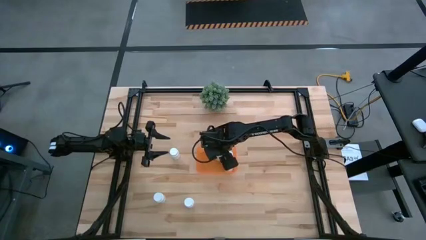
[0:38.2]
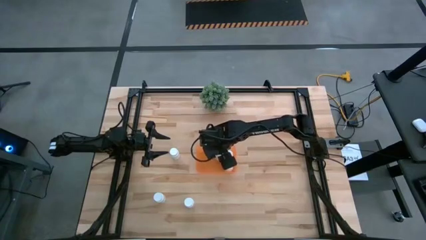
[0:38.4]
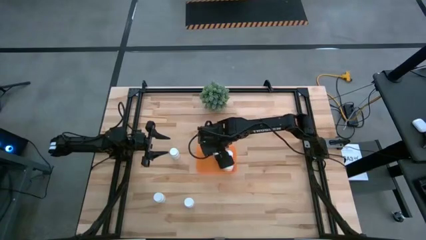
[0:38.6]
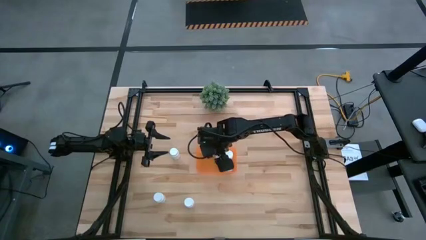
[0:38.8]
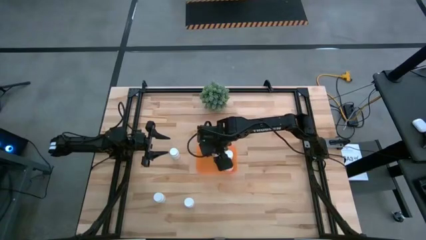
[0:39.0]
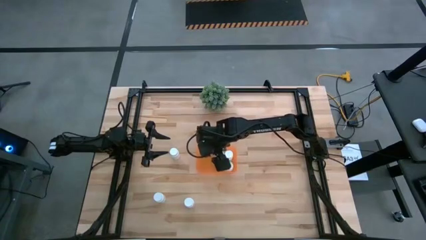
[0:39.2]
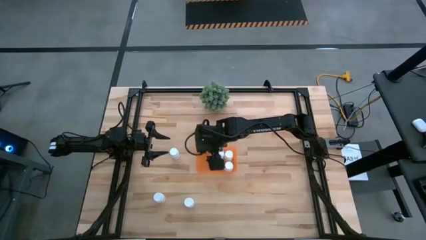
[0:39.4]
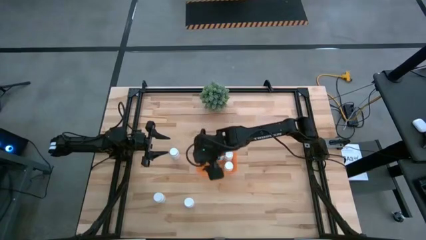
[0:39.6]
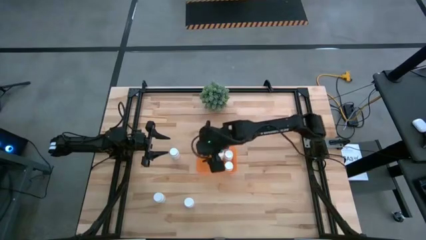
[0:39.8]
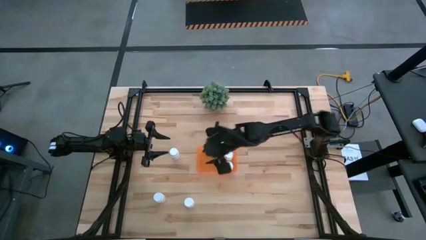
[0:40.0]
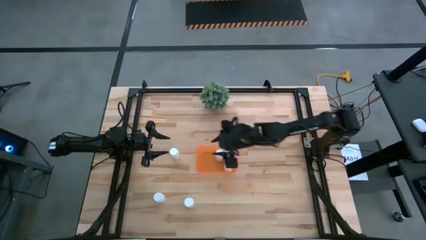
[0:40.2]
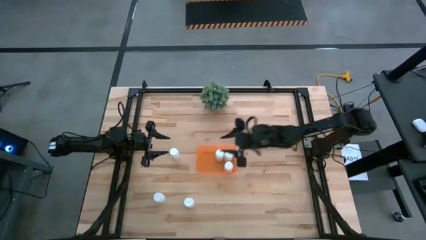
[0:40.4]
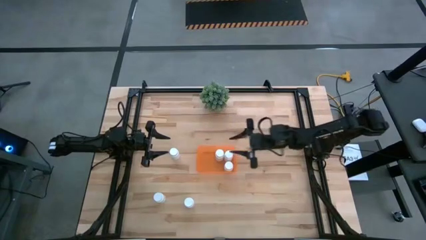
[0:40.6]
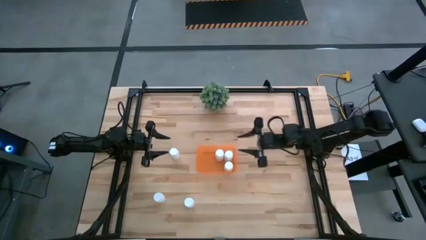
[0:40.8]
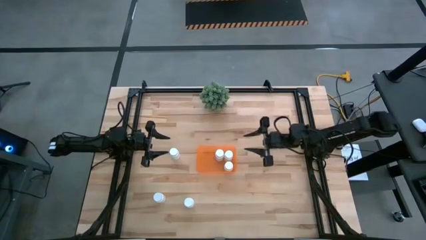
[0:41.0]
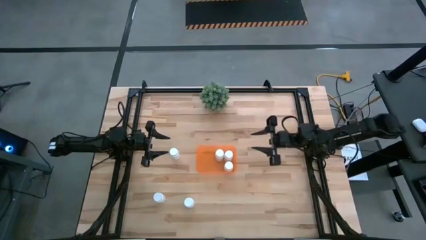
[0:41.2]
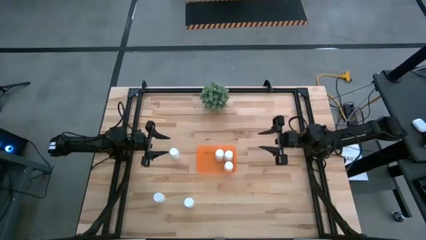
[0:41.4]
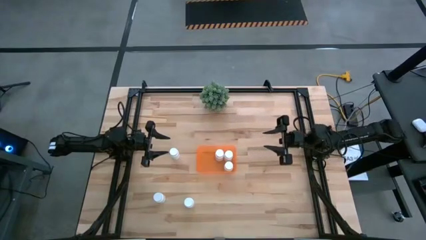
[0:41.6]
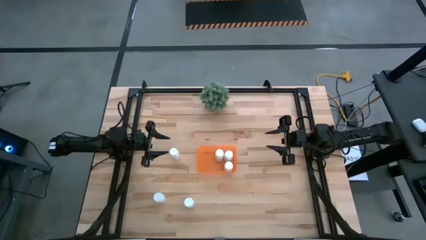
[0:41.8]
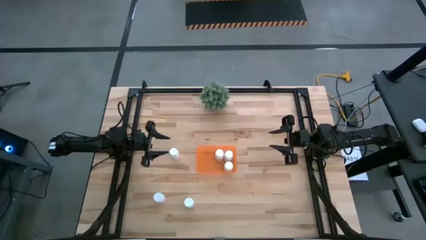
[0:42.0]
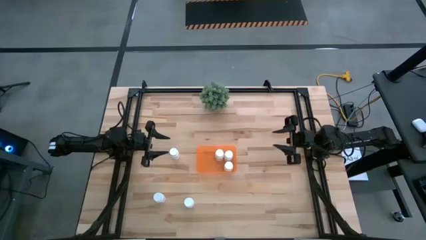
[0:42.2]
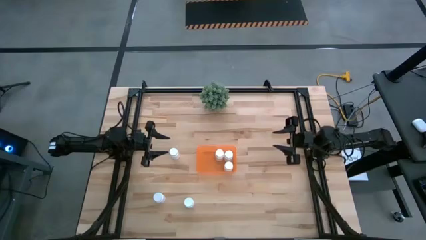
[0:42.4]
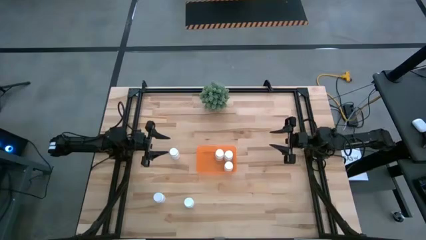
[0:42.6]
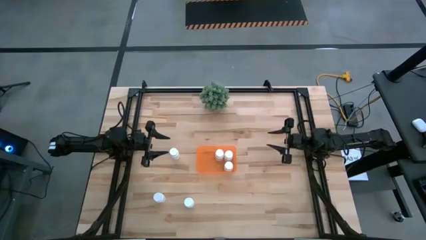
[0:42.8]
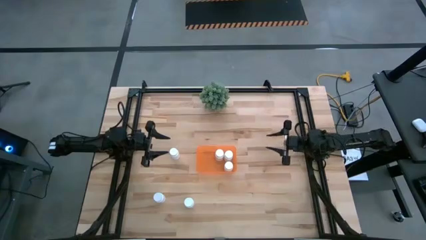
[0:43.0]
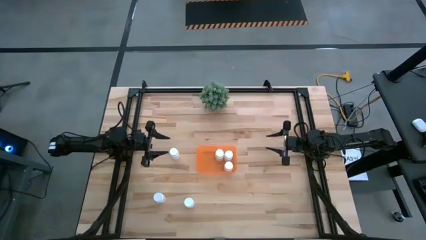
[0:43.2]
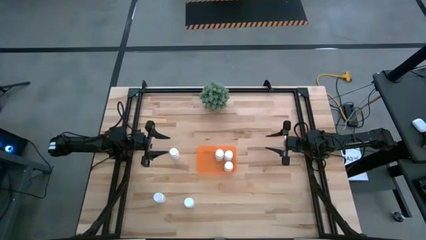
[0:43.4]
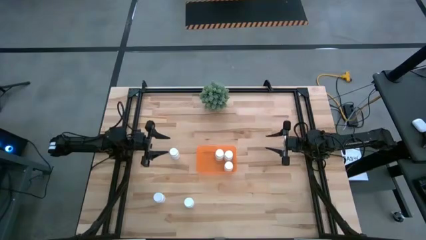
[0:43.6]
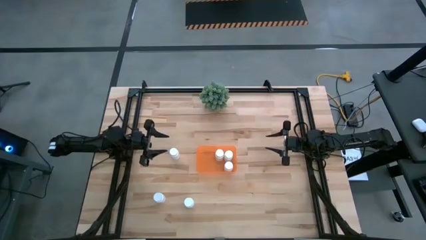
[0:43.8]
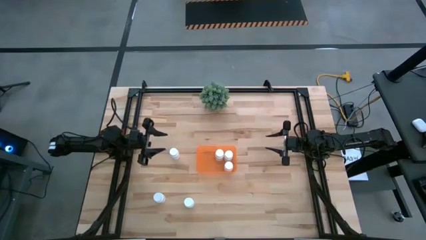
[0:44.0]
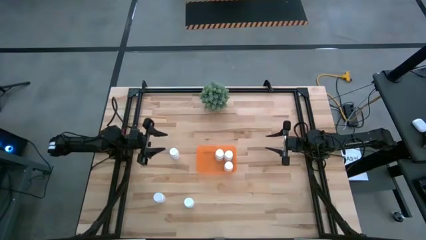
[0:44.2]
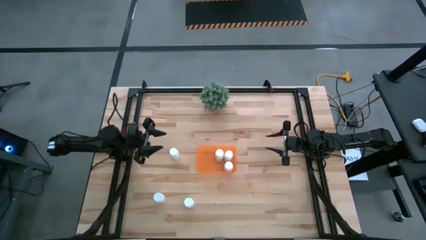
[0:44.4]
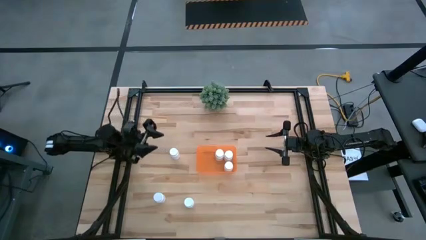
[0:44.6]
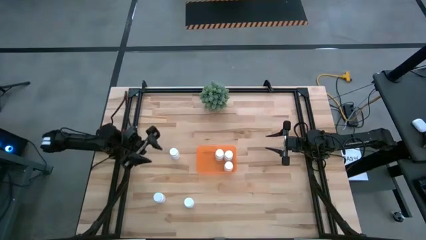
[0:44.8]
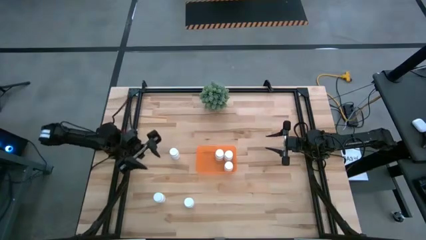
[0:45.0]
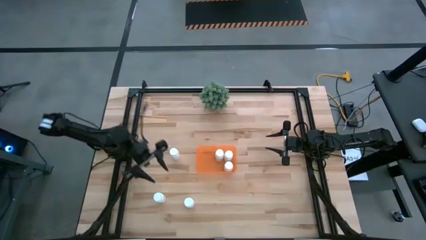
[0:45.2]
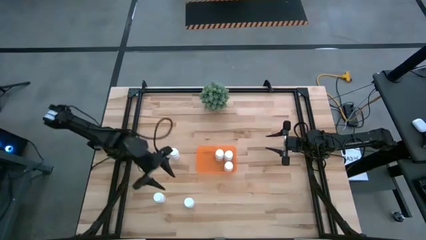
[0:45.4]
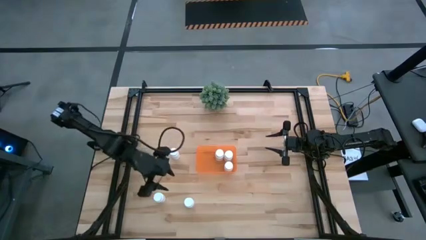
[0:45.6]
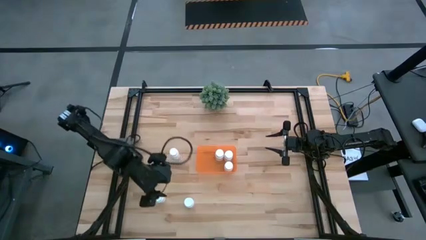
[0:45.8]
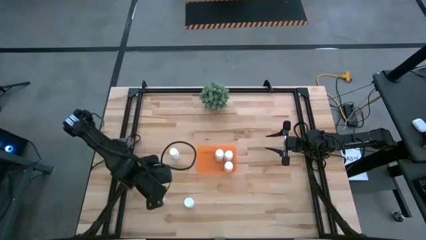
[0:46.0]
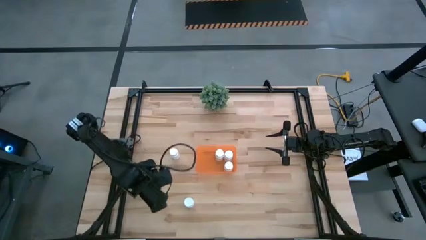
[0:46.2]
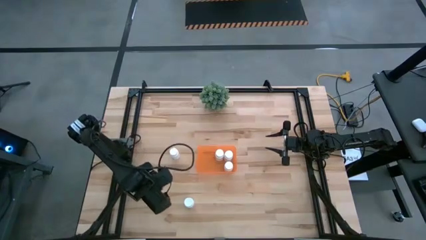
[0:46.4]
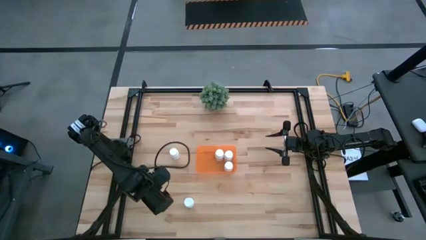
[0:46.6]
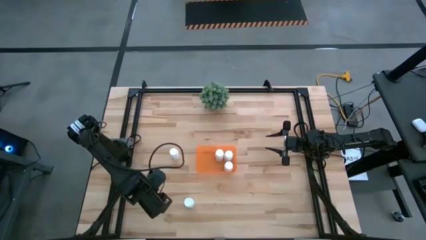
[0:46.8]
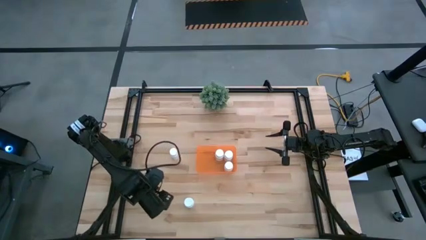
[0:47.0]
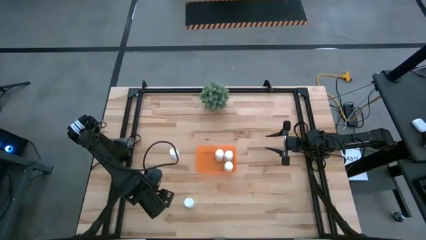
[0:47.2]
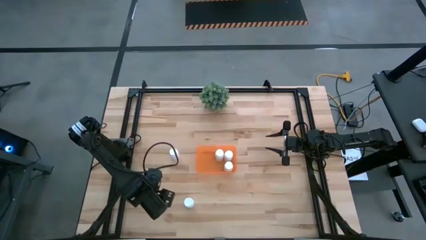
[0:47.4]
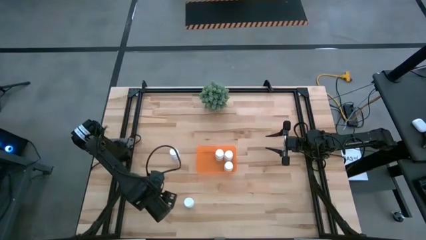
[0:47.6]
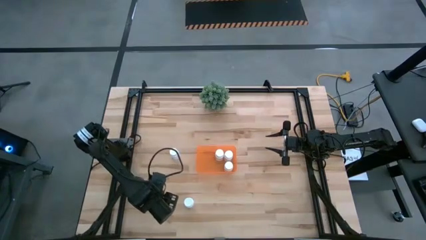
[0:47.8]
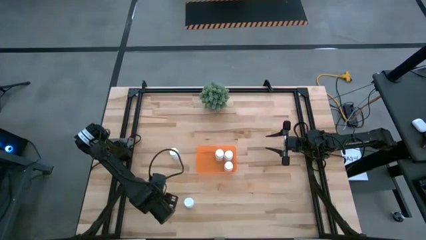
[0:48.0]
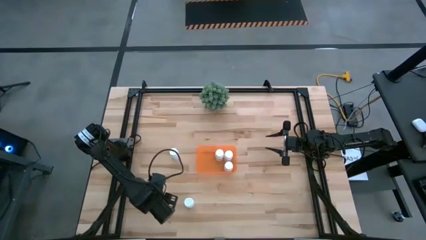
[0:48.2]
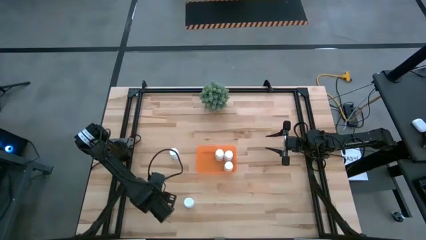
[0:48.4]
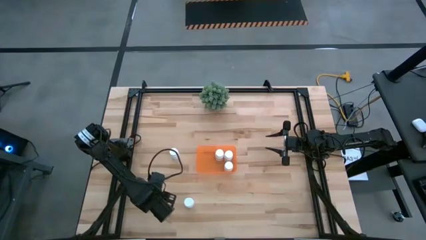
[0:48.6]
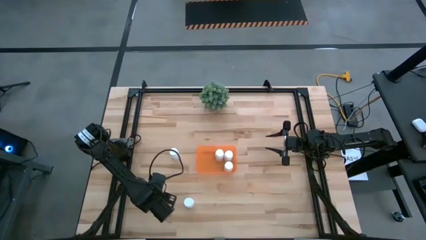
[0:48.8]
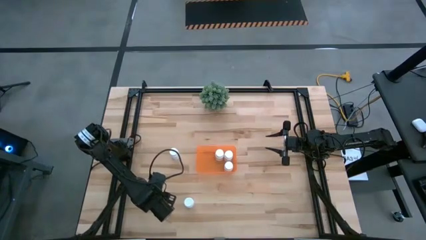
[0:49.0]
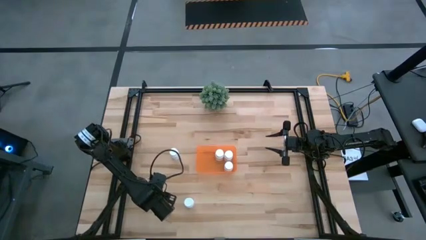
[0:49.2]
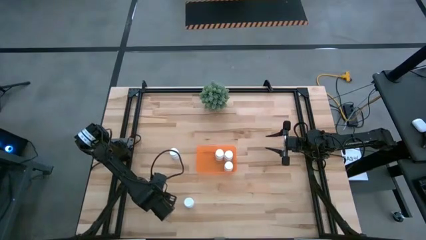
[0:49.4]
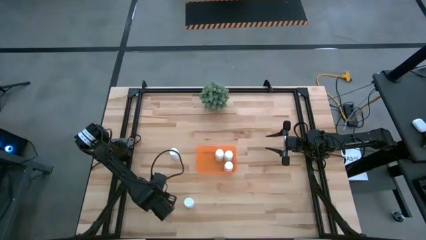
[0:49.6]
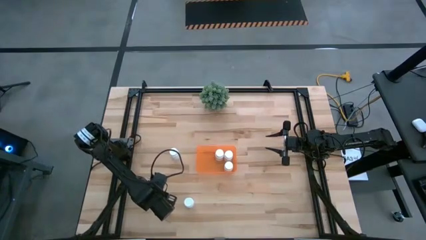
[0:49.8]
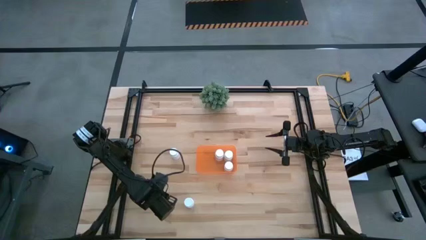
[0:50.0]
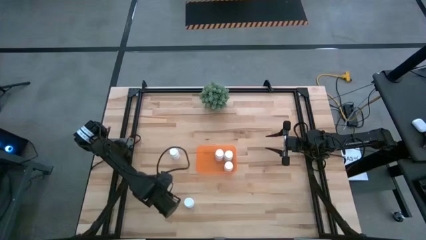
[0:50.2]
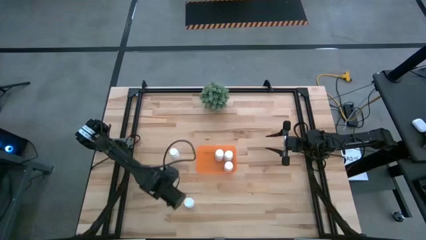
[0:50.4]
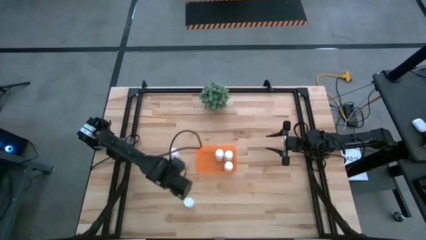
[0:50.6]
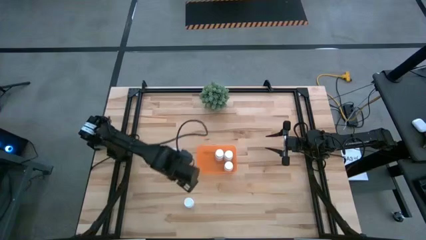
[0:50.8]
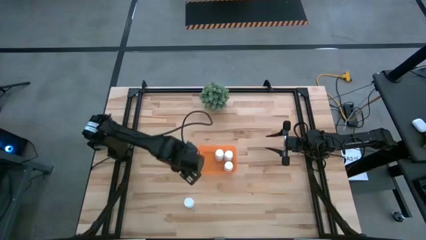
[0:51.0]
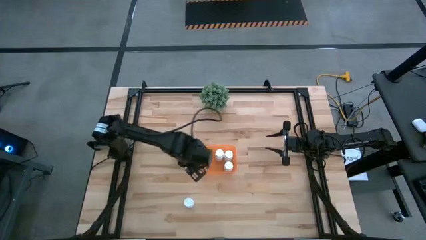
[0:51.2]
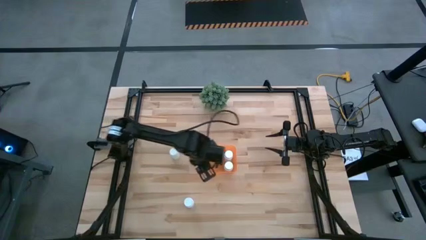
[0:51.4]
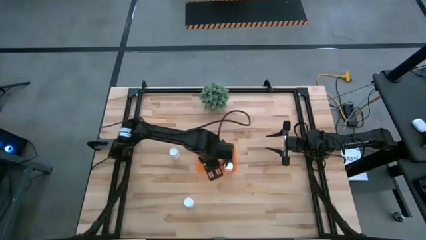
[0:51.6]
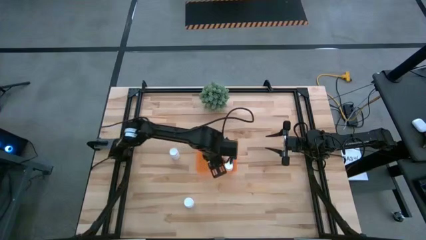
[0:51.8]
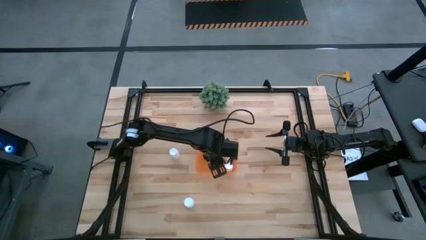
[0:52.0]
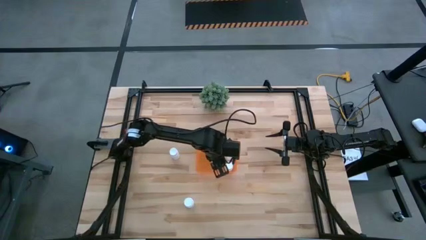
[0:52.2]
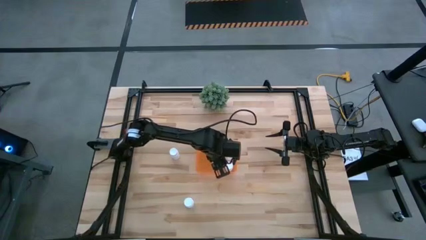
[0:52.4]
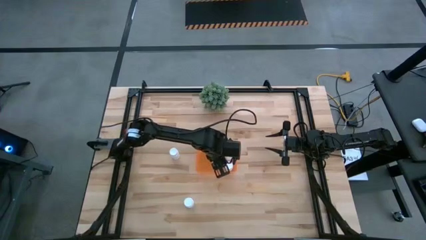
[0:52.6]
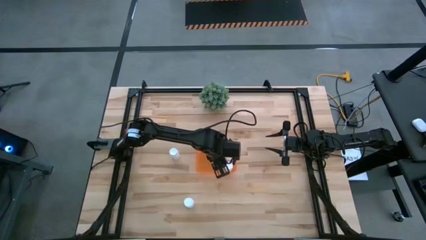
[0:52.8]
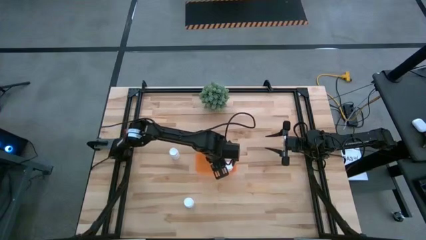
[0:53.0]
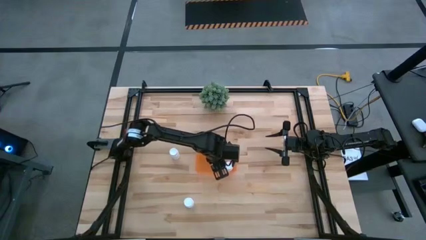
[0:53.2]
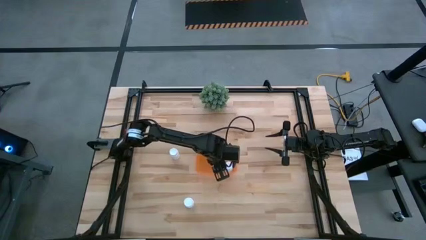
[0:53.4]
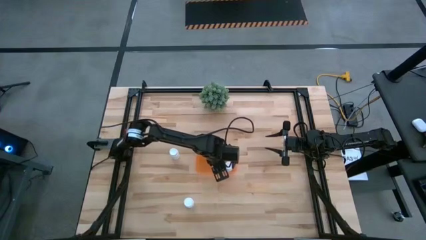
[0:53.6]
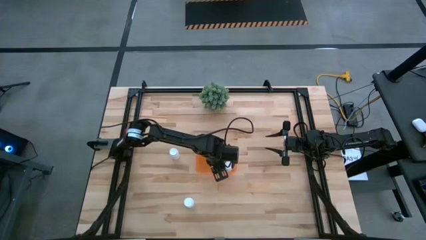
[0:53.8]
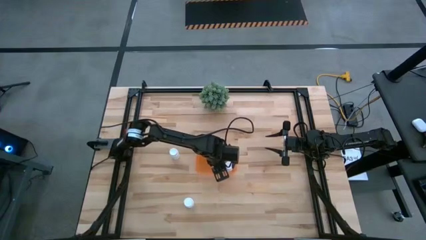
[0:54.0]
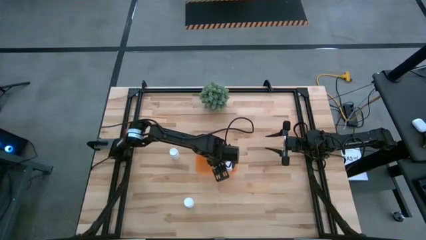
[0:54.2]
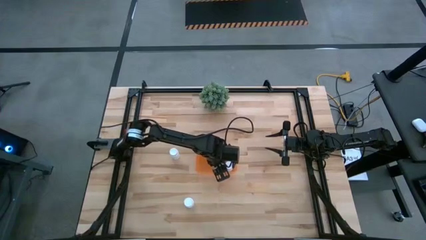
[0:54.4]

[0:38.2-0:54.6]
Task: Pick and place pill bottles into a basket
Put the white medicine bottle into the orange bin
